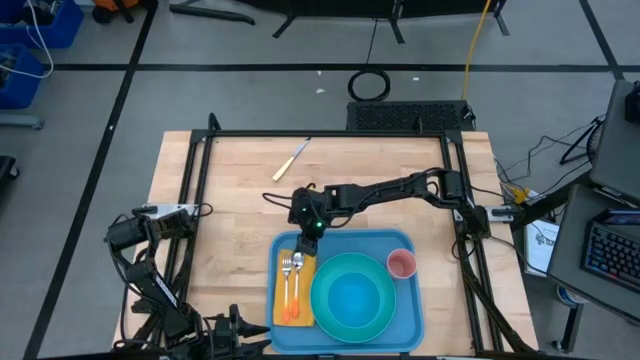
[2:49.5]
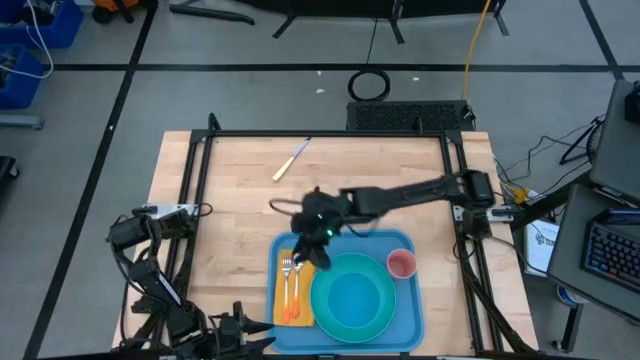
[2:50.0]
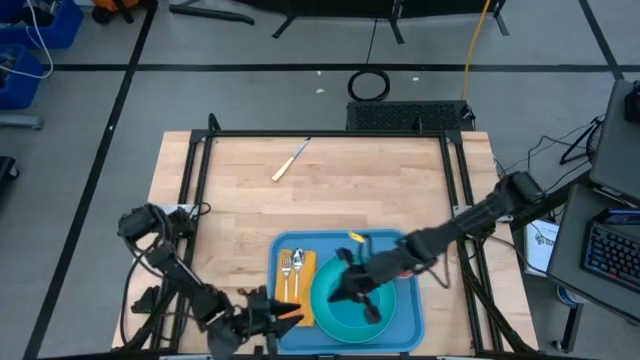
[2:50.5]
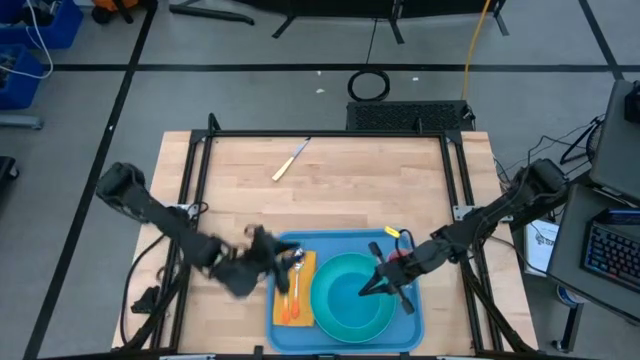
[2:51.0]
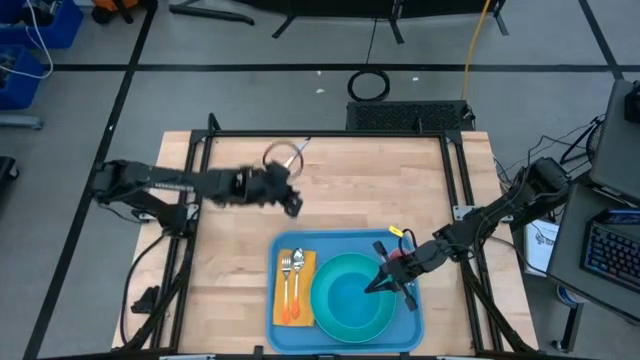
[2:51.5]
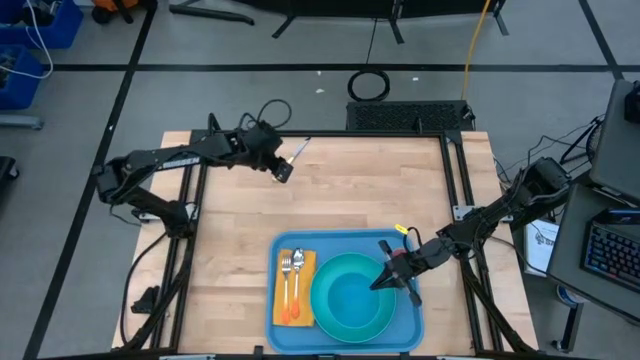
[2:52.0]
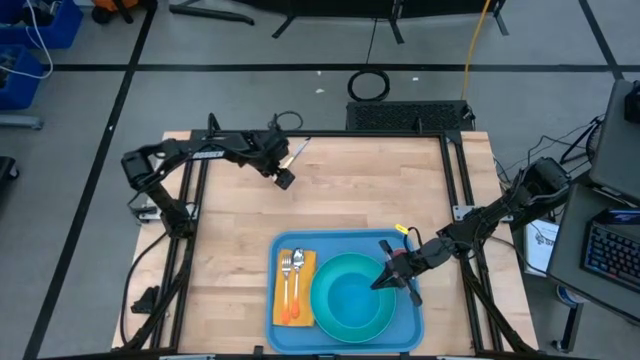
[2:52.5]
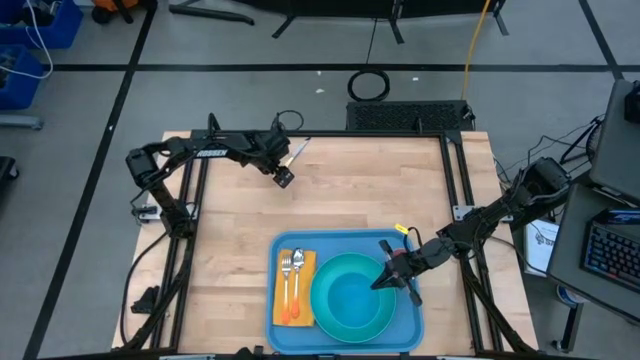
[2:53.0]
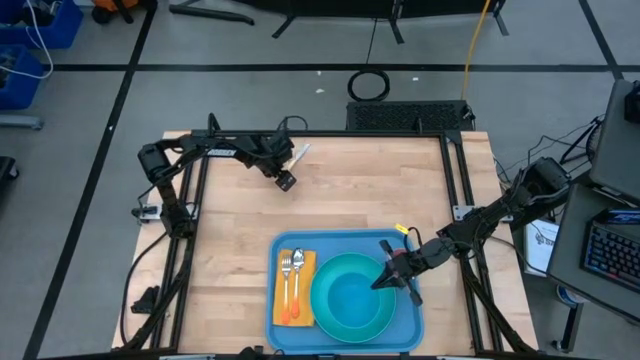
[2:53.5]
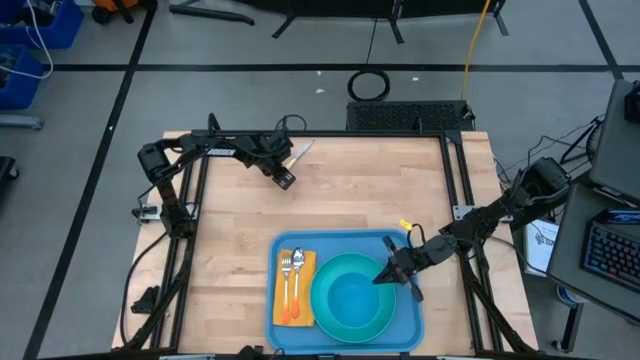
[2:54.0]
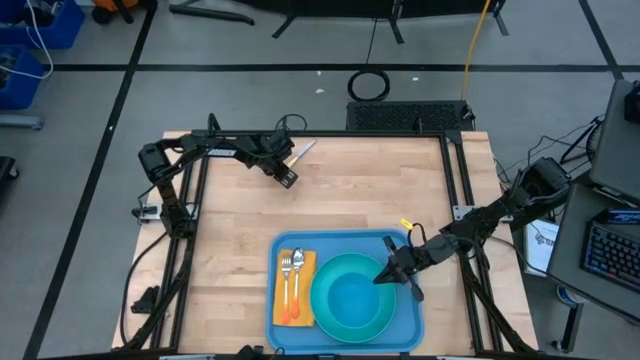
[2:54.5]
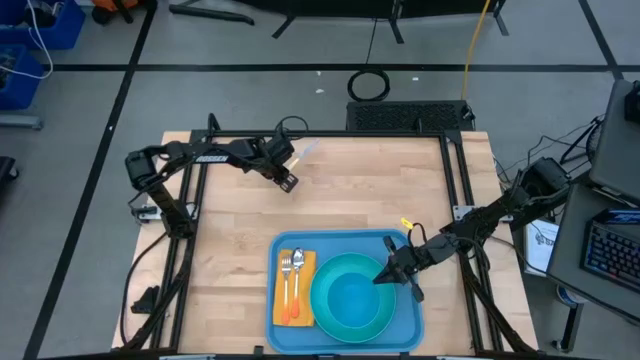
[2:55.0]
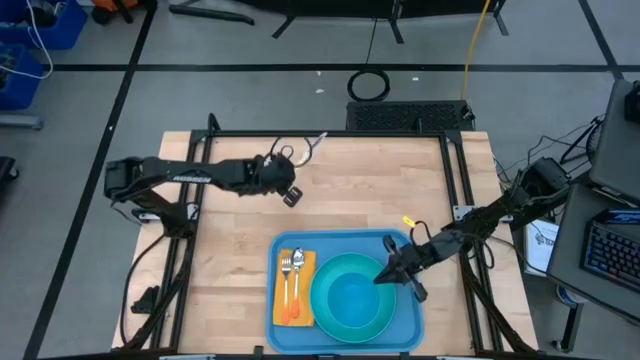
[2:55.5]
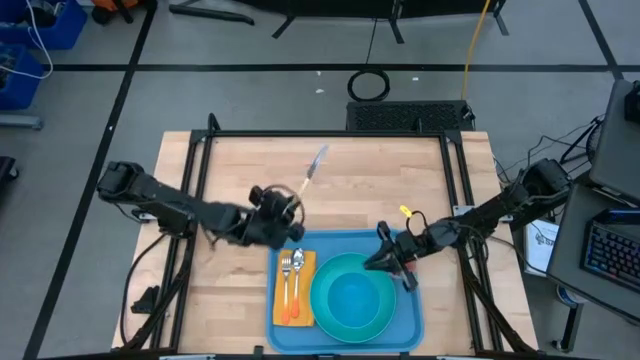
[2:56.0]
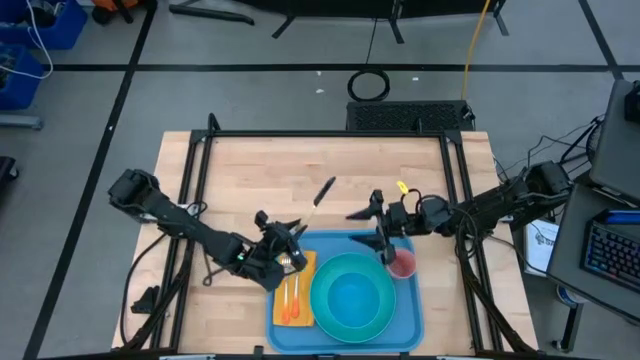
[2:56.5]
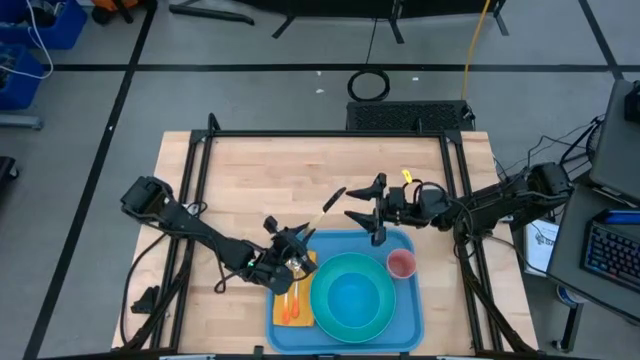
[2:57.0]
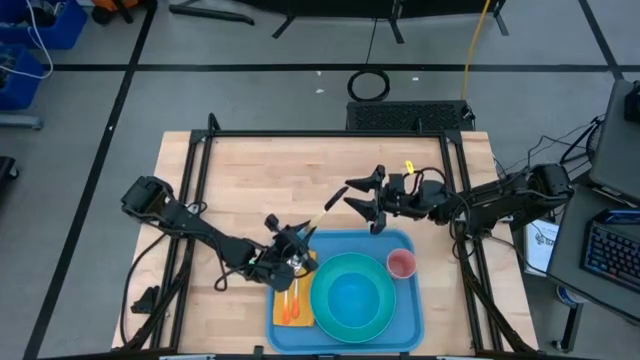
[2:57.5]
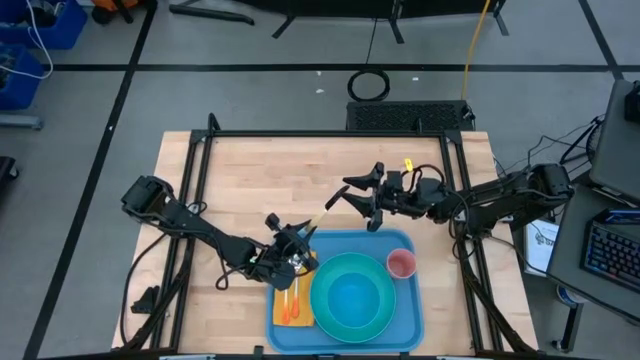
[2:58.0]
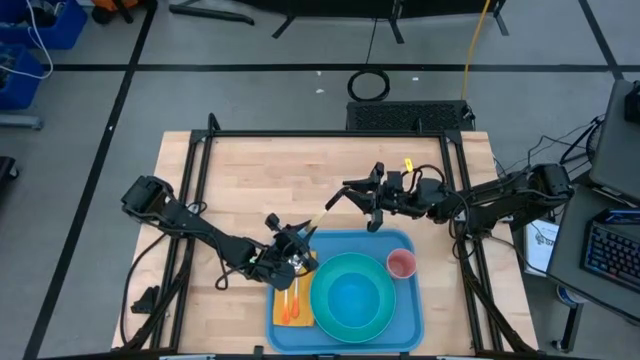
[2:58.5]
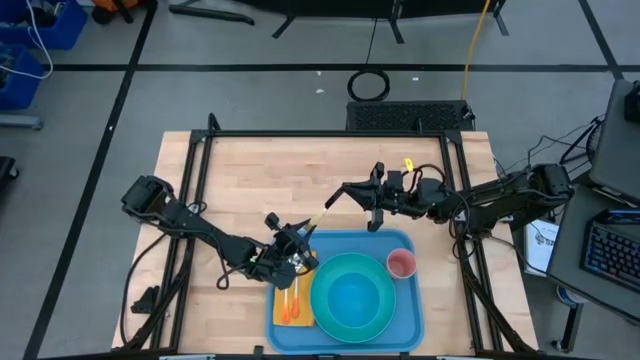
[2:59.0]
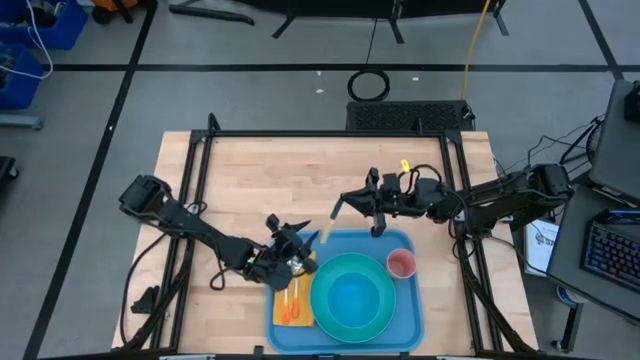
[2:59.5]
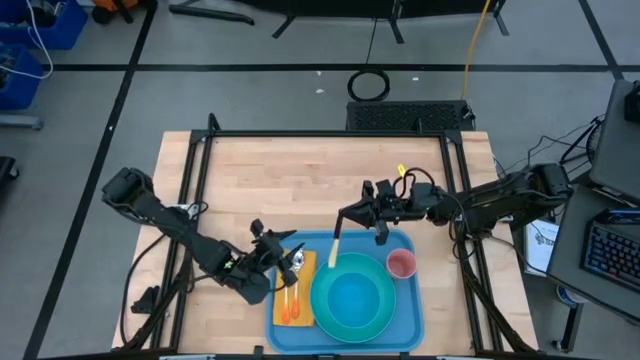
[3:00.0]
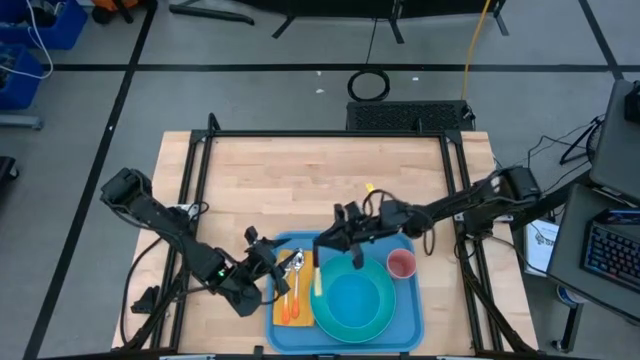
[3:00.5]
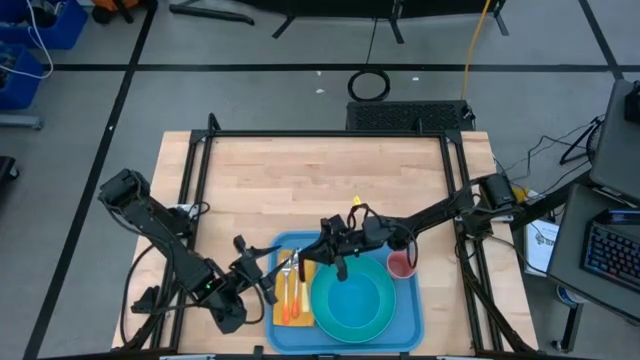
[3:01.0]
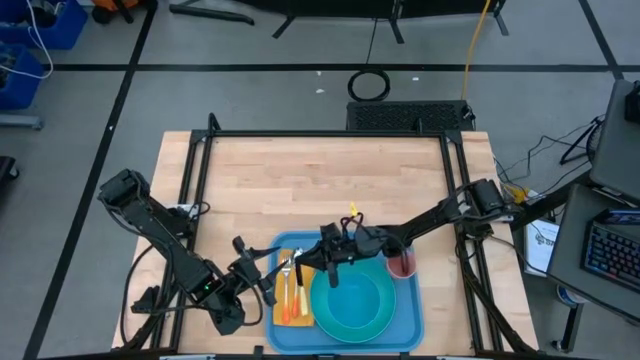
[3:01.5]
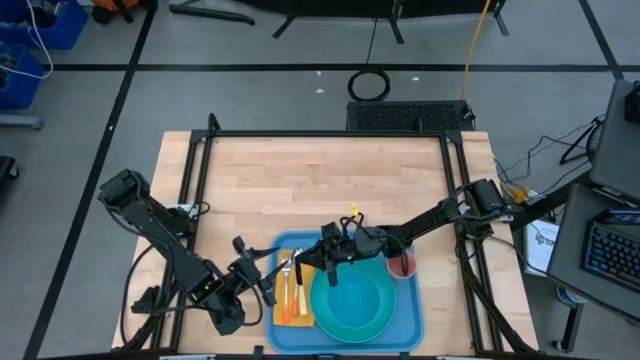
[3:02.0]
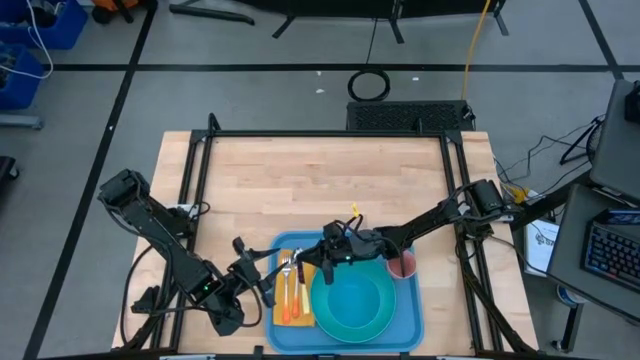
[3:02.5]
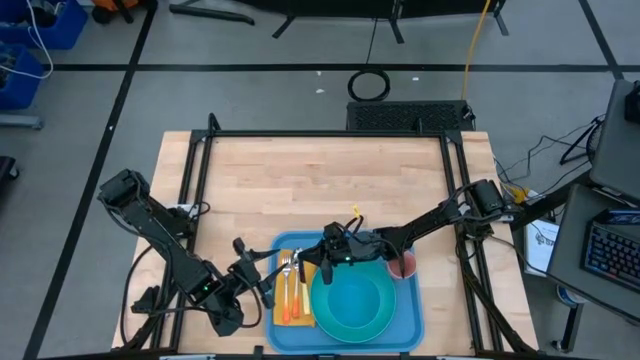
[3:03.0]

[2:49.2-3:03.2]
Task: Set up tray
Put the yellow table knife on top of the yellow table napkin to the right of the orange spoon

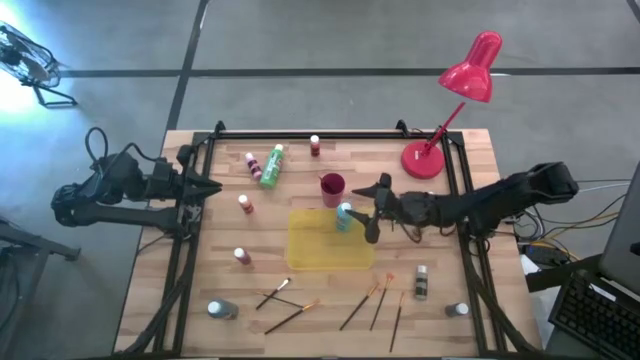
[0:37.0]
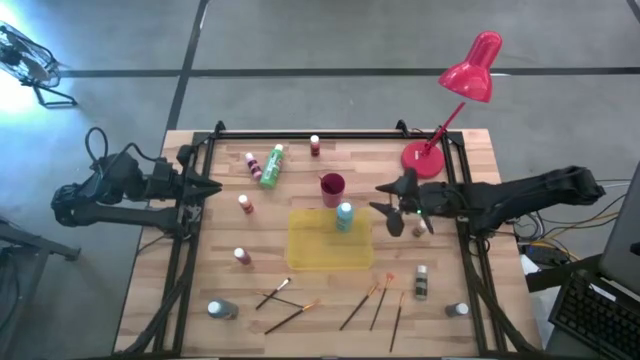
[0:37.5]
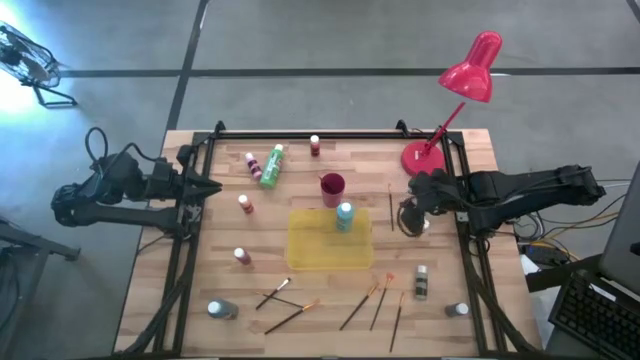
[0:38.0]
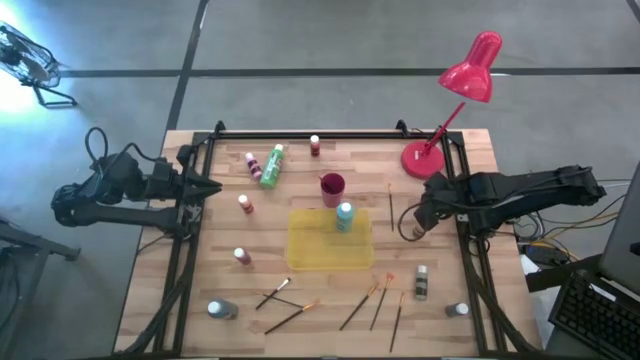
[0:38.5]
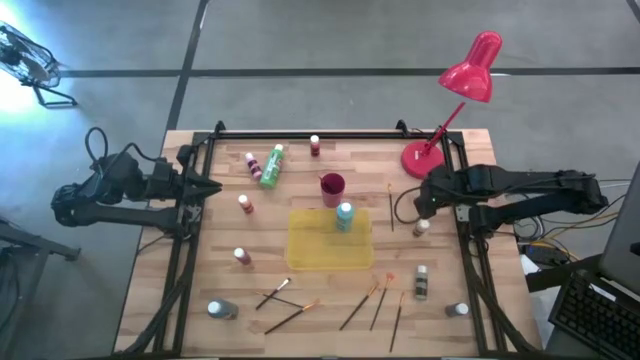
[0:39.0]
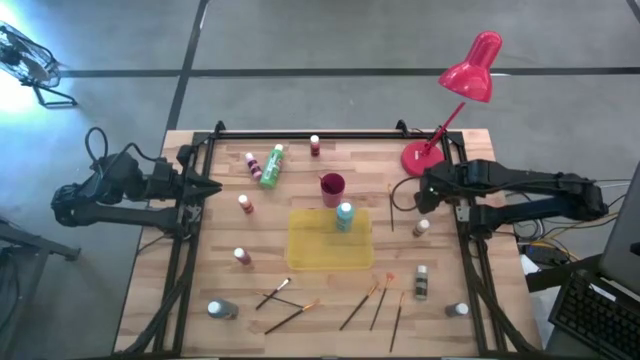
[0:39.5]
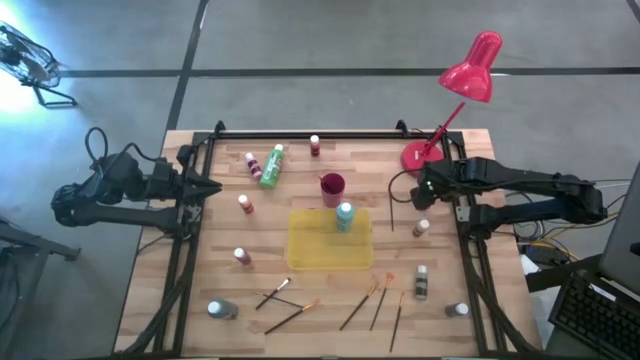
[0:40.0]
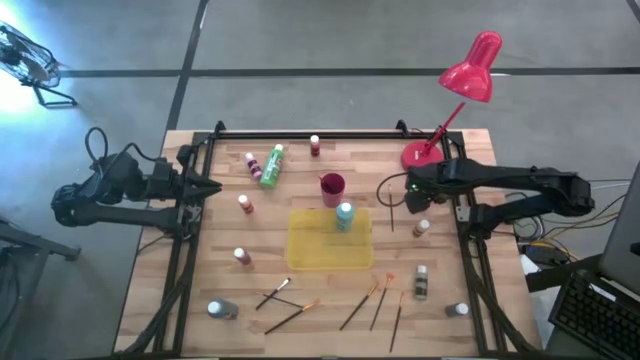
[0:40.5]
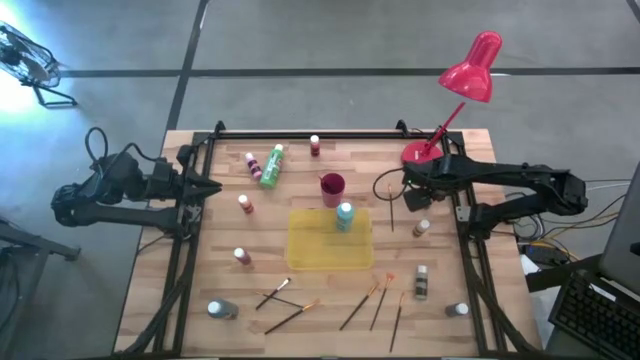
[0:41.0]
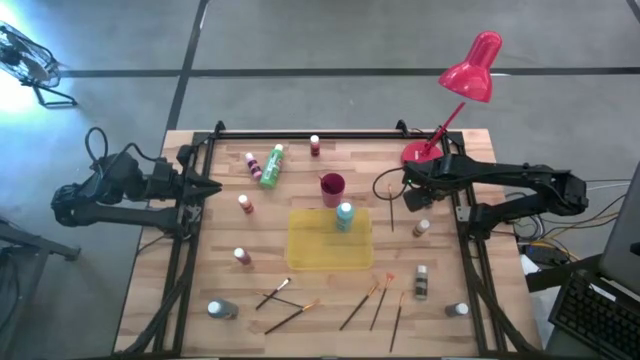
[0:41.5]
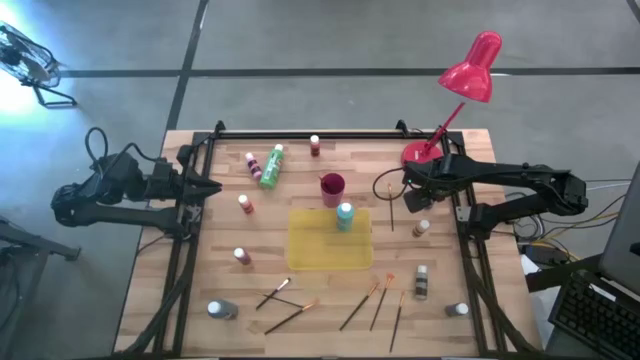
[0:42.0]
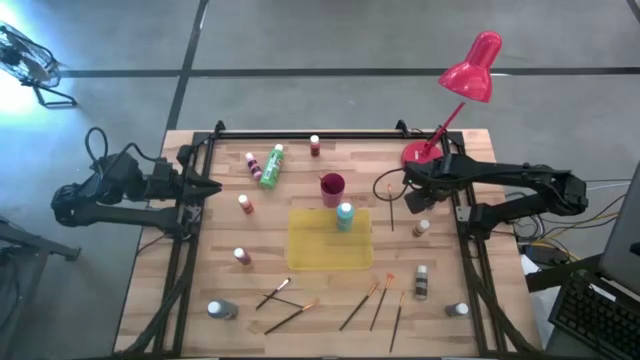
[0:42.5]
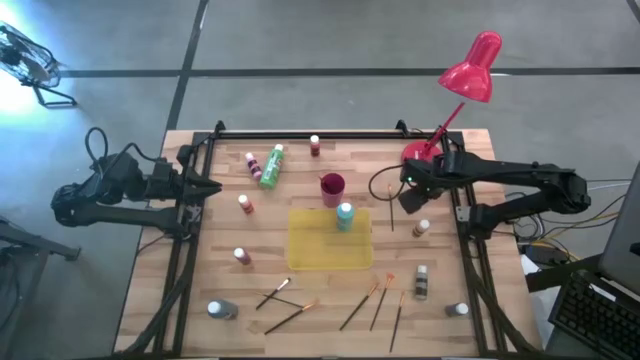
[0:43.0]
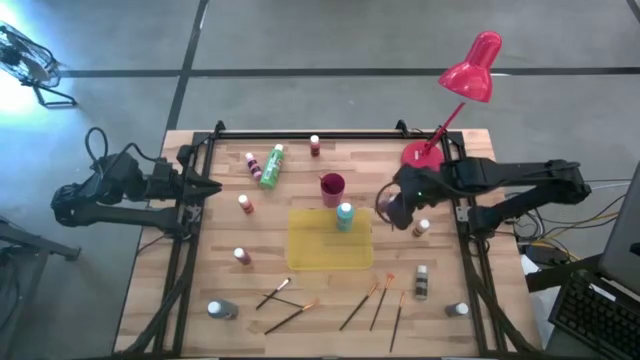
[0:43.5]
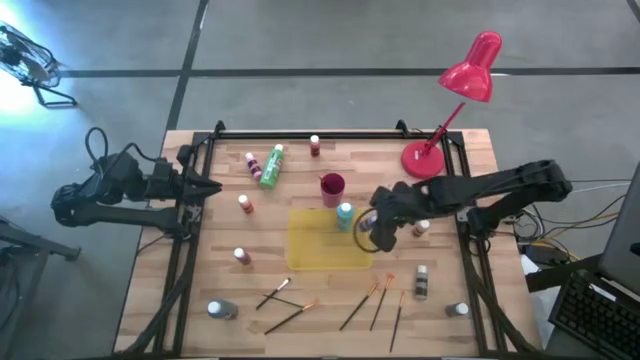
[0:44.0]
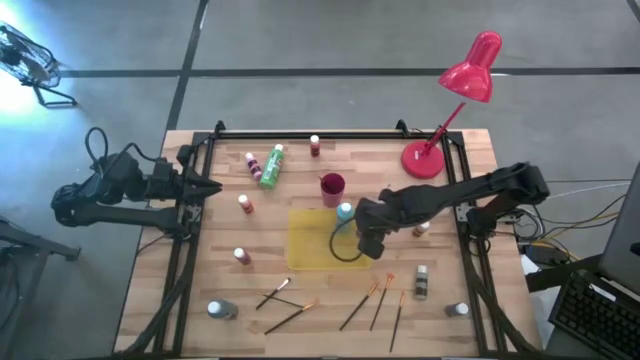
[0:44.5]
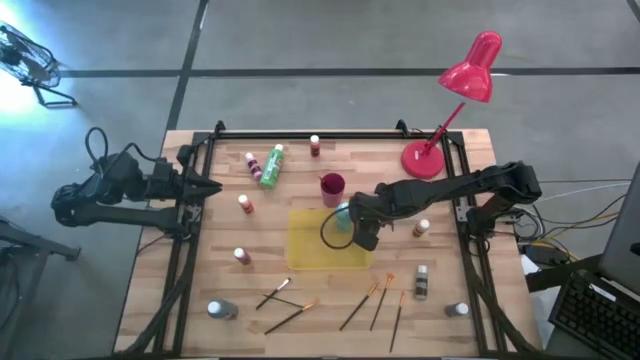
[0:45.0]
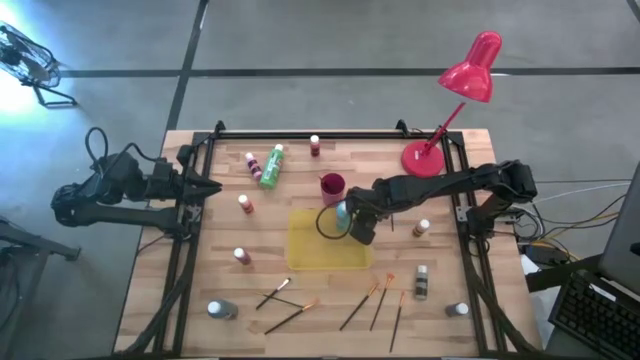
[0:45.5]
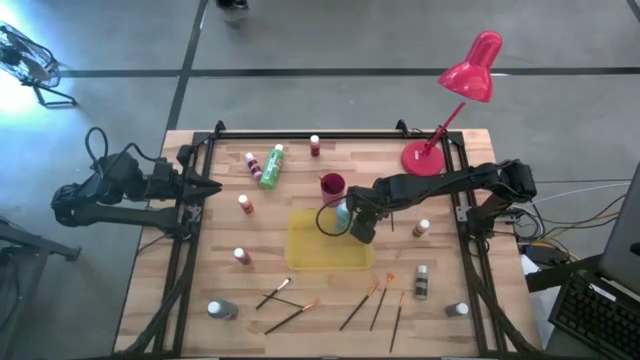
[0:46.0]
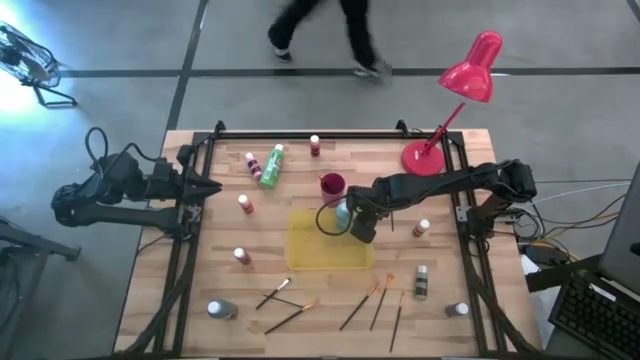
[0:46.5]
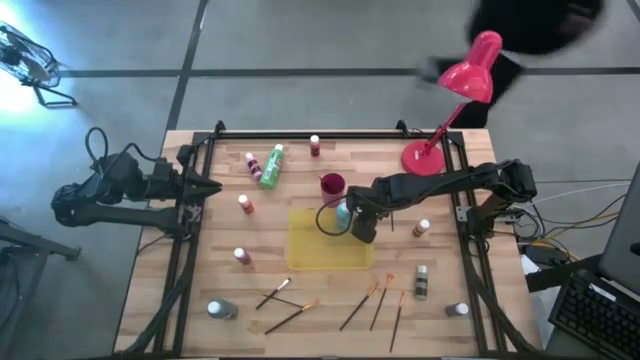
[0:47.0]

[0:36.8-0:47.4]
Task: Pick & Place Paint Supplies
Put the small purple paint bottle into the yellow bin
